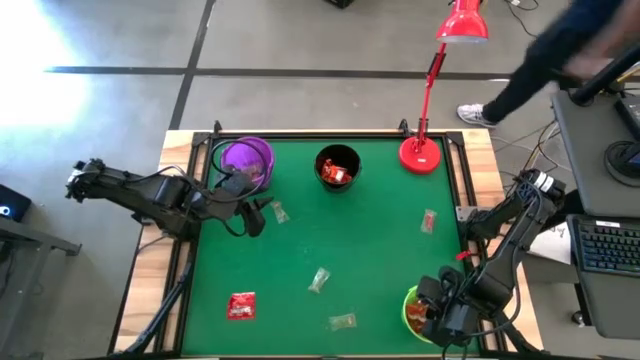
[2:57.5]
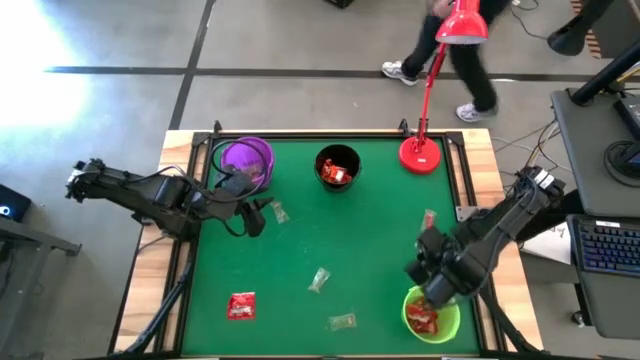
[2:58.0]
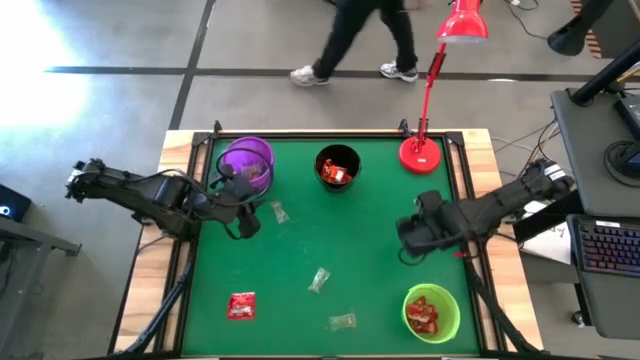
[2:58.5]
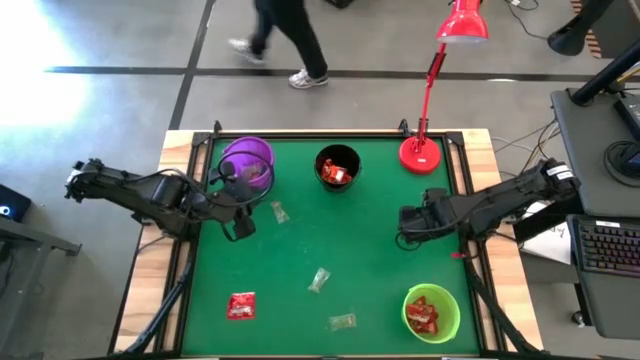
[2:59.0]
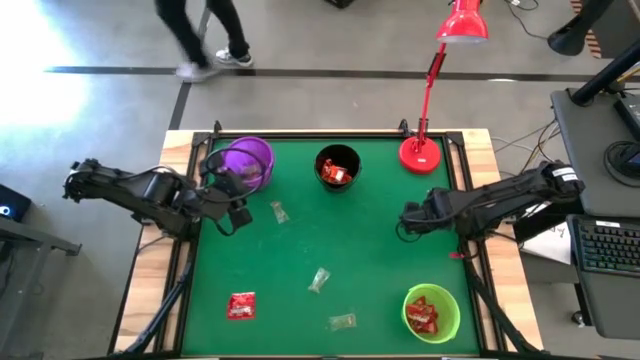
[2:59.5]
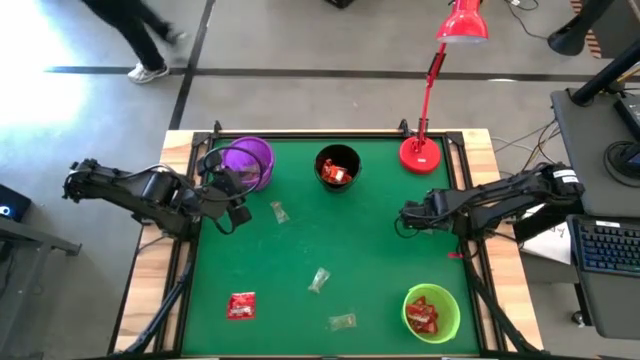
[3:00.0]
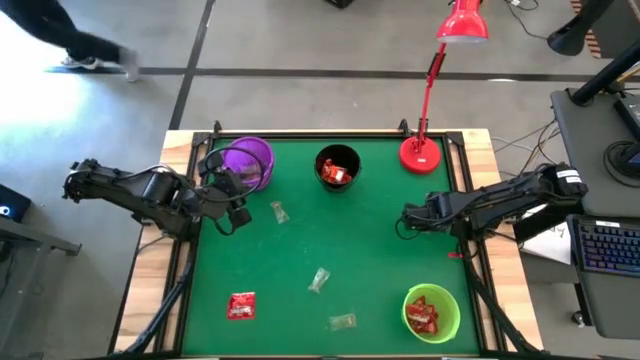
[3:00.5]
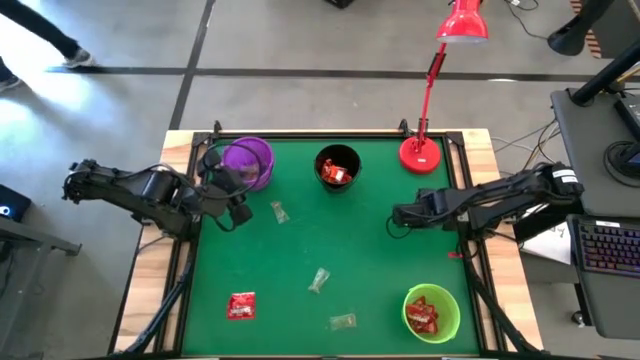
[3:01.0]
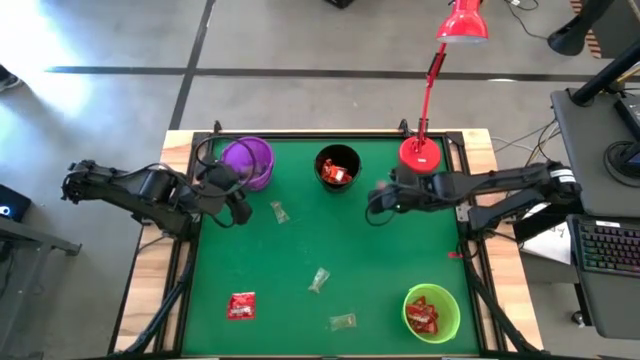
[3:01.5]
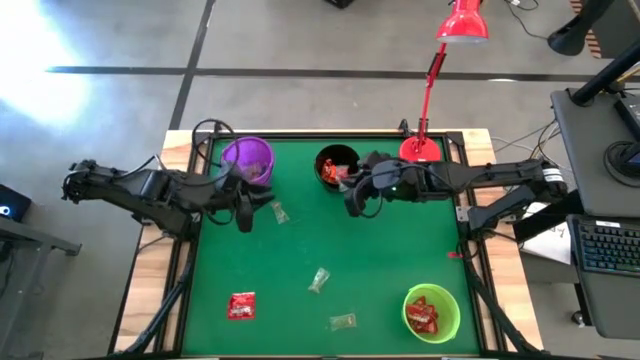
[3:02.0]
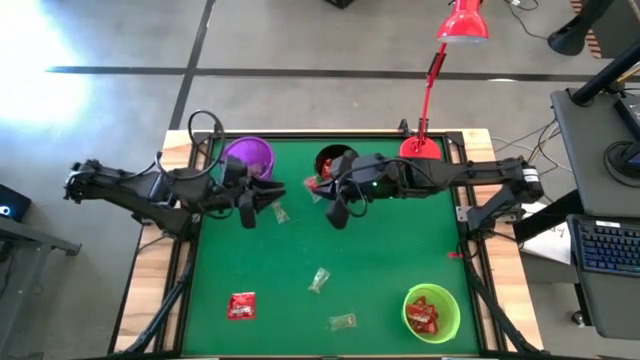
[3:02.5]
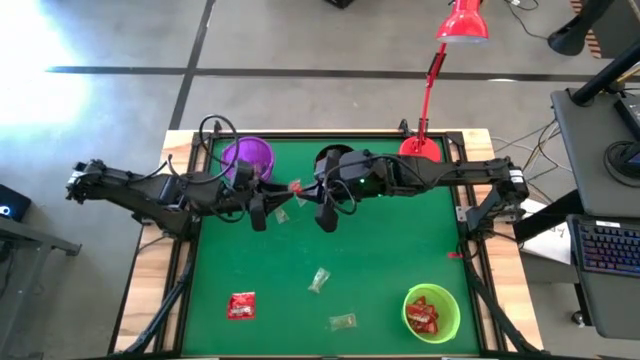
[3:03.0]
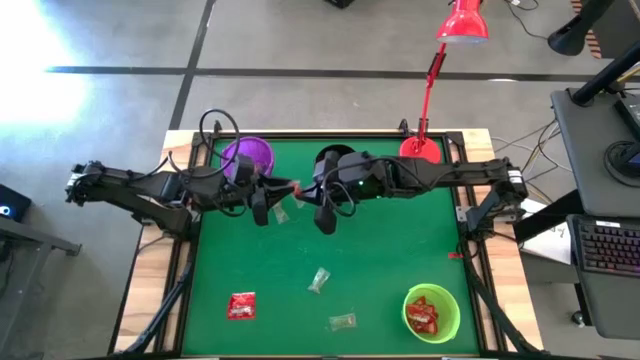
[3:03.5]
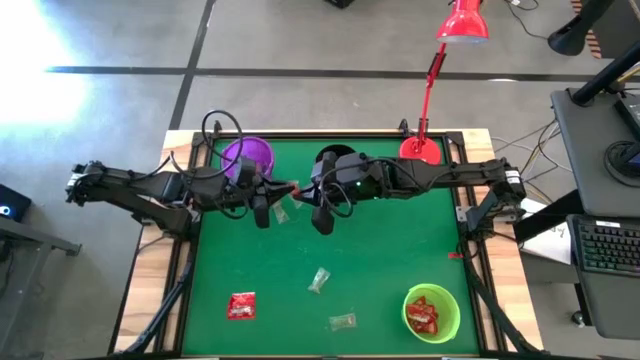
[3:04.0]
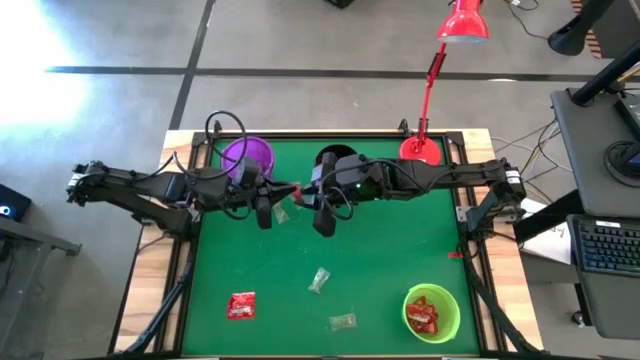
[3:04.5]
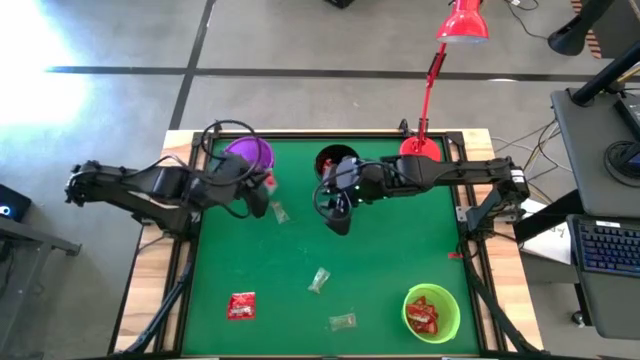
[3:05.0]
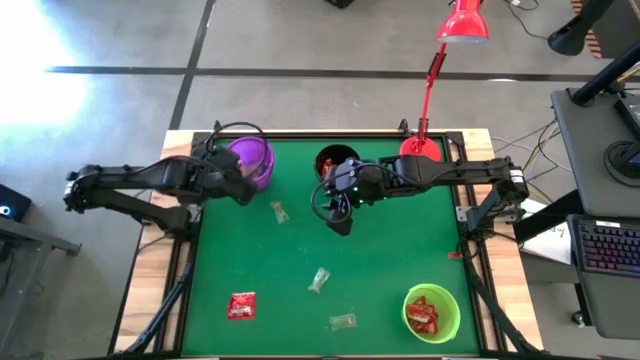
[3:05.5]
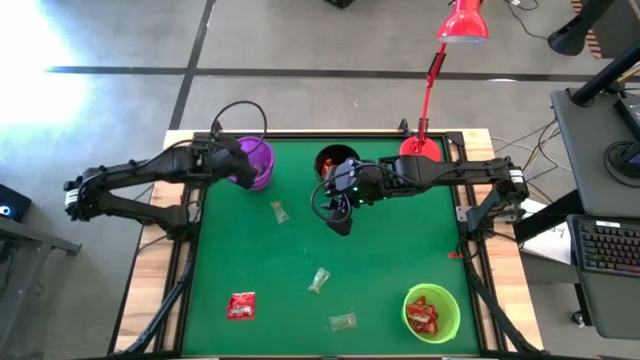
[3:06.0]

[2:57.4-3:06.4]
Task: Sort candy
Put the red gummy into the violet bucket

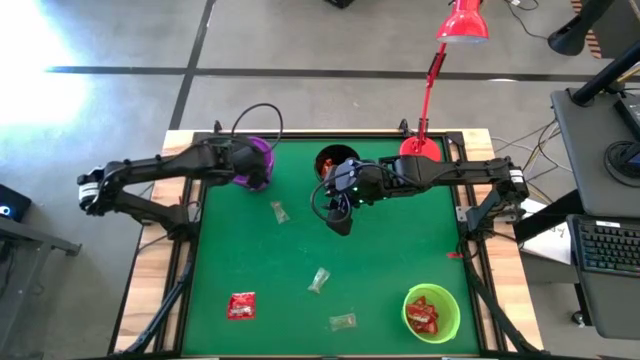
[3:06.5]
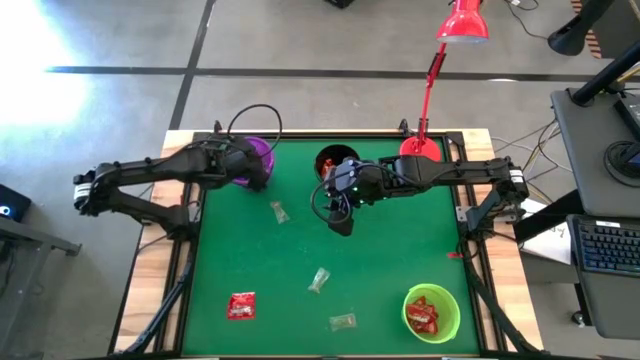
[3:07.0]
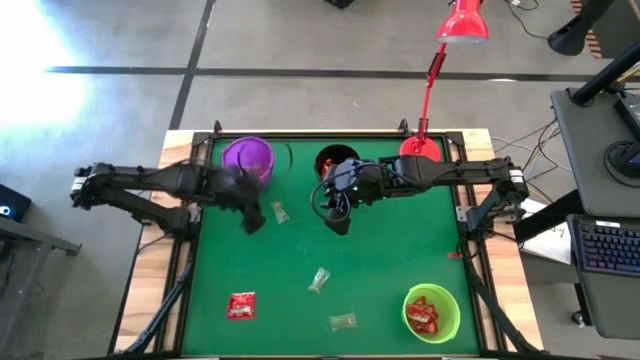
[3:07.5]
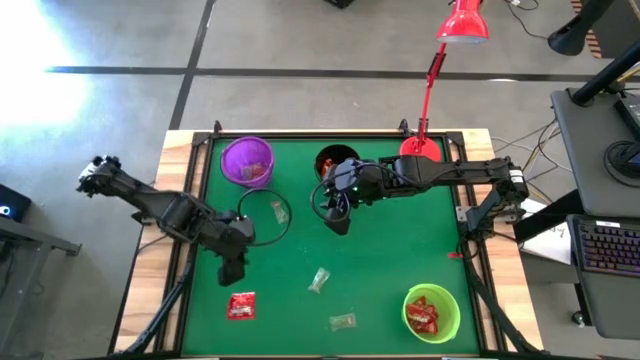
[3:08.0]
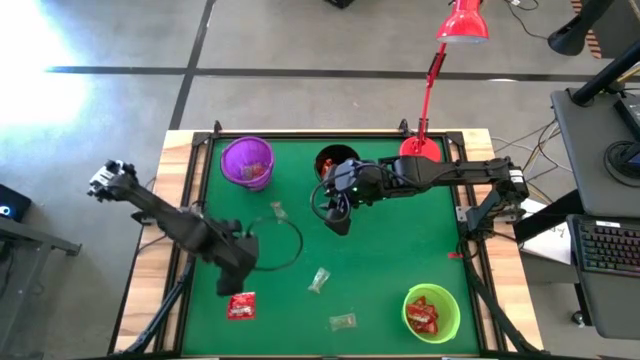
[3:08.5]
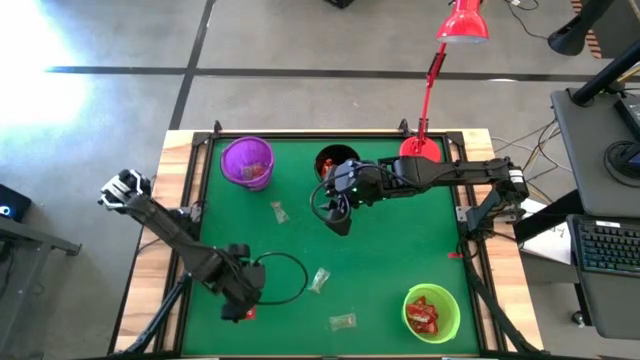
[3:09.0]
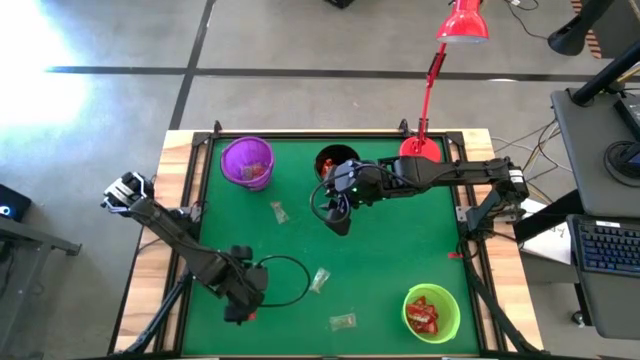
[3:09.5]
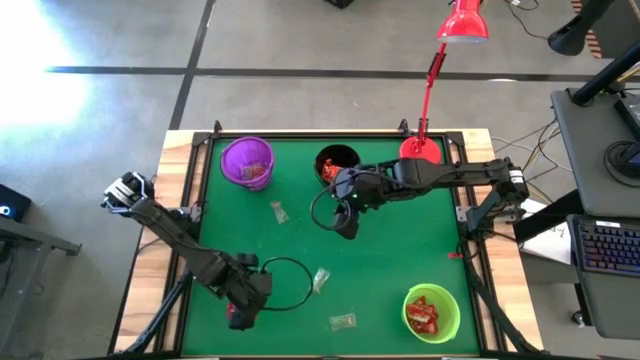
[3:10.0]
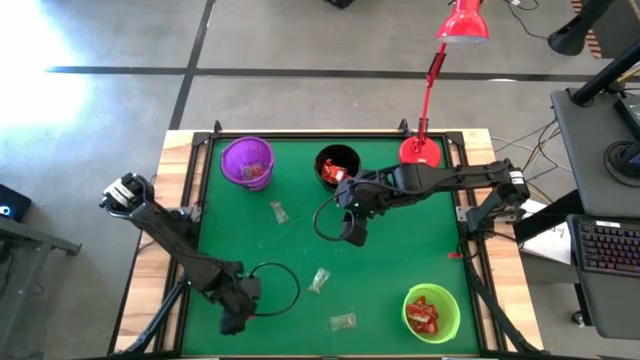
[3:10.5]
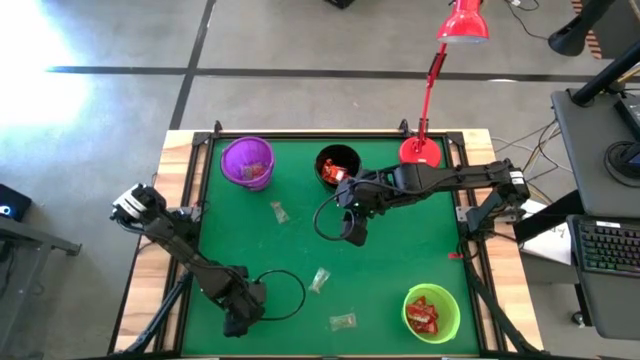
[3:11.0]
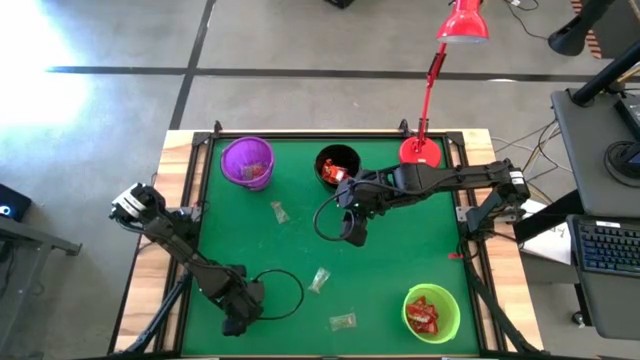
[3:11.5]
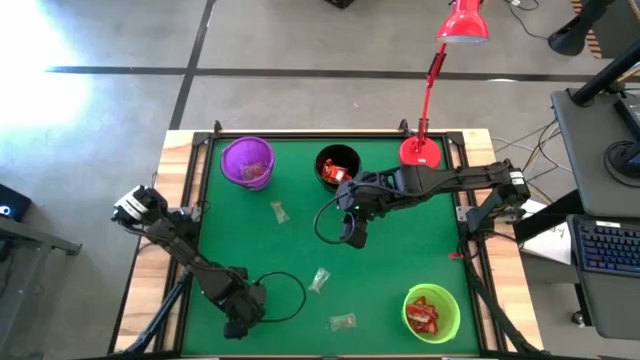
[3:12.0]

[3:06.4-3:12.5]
Put the red candy into the green bucket

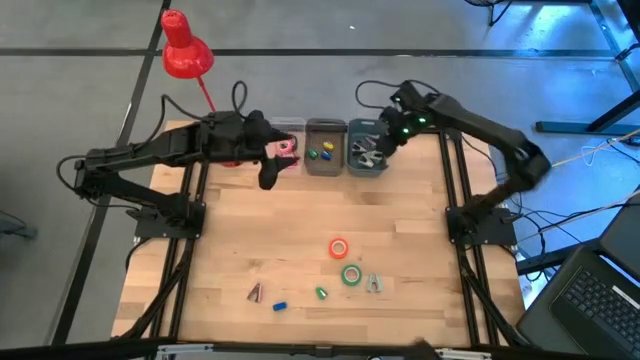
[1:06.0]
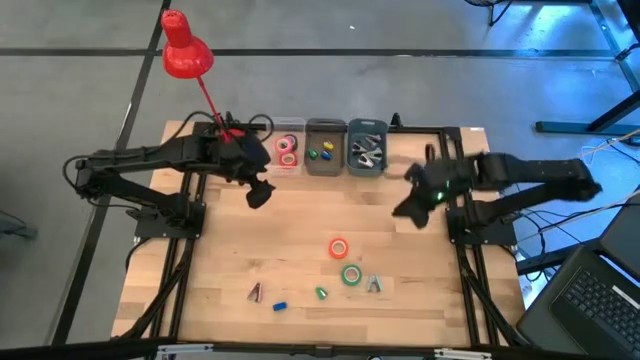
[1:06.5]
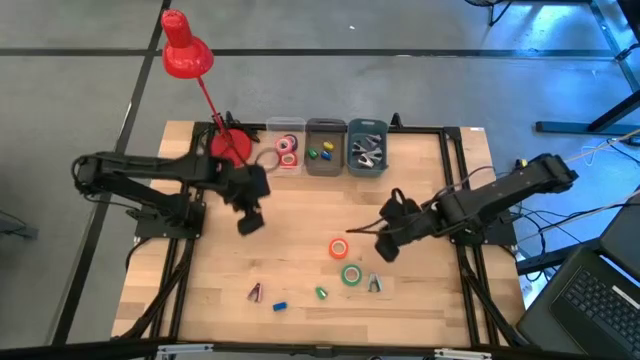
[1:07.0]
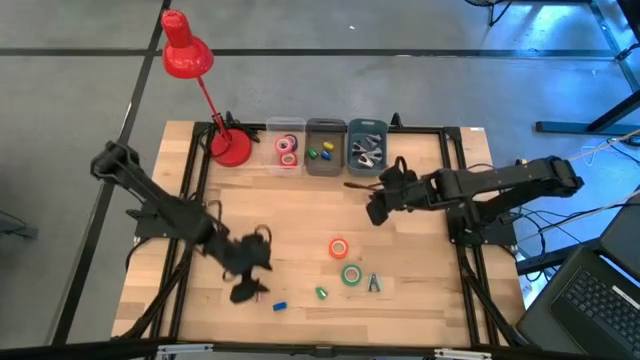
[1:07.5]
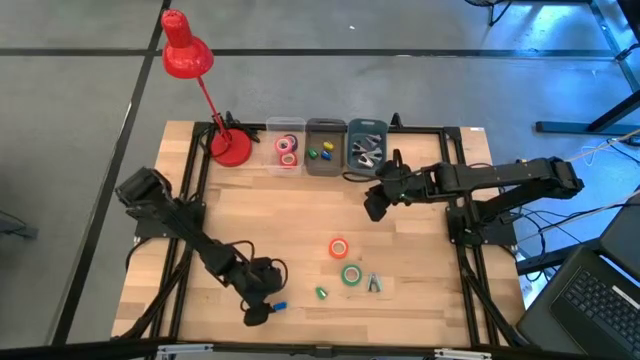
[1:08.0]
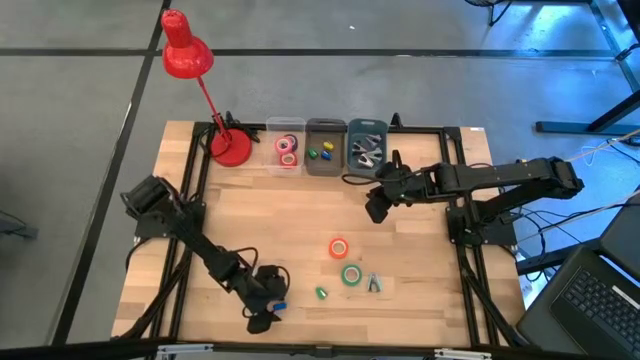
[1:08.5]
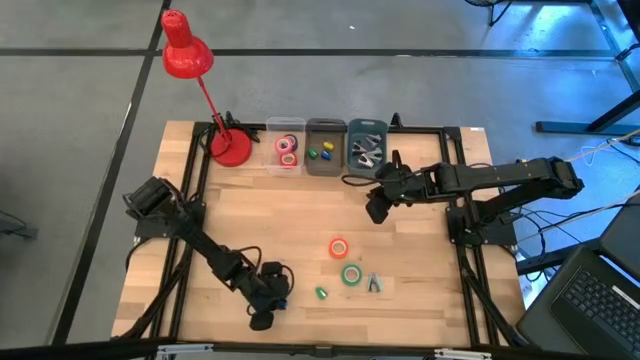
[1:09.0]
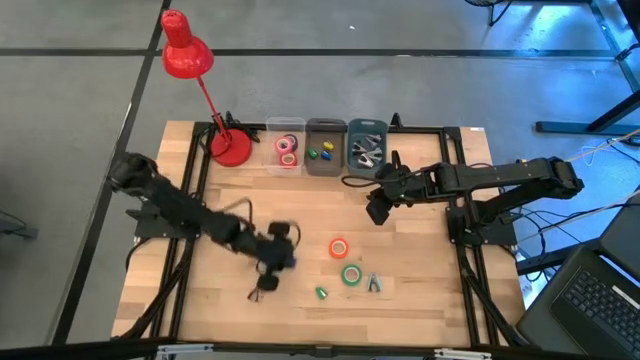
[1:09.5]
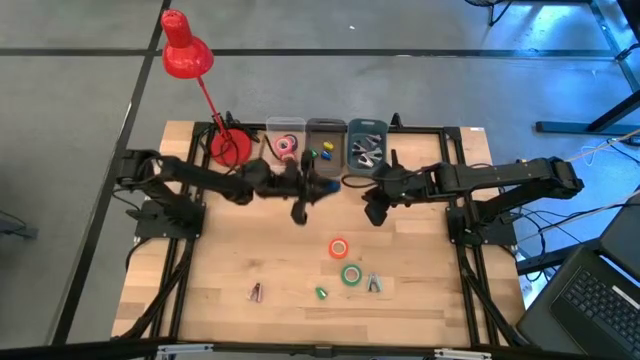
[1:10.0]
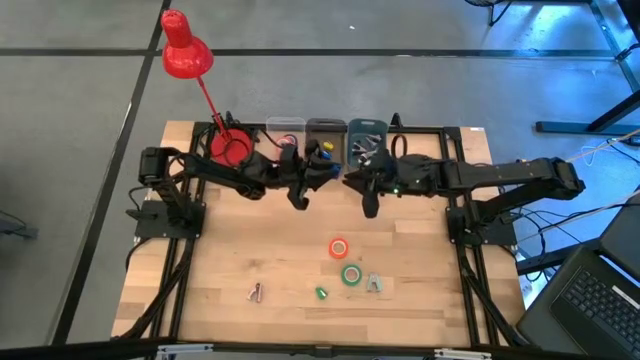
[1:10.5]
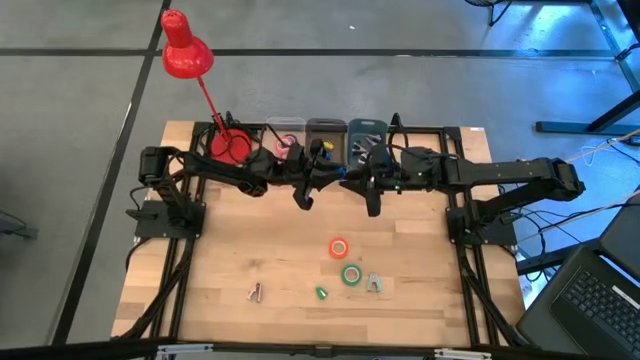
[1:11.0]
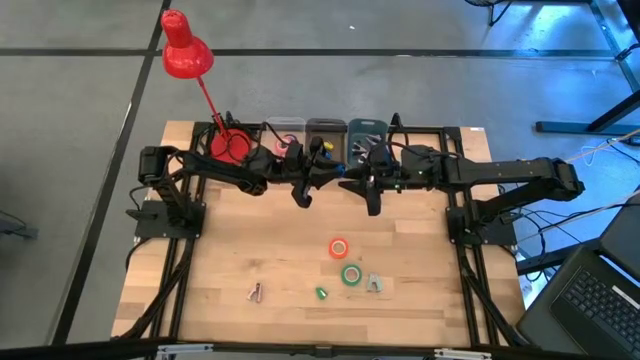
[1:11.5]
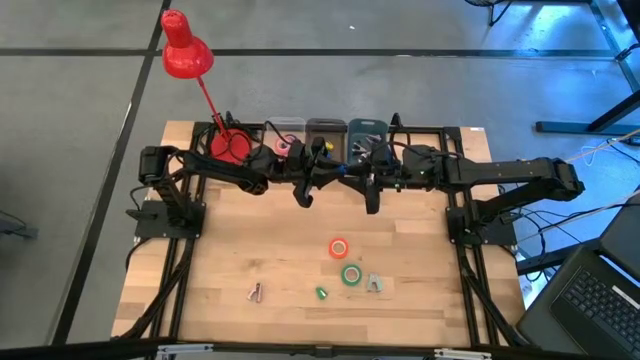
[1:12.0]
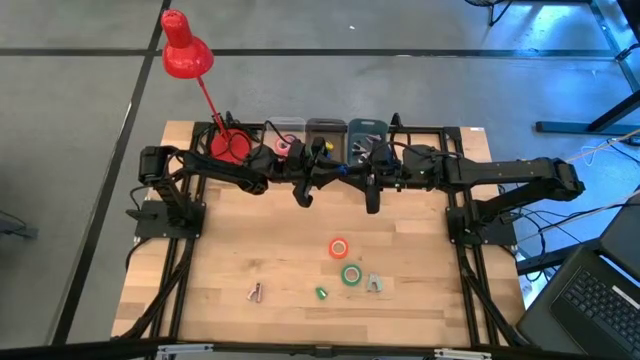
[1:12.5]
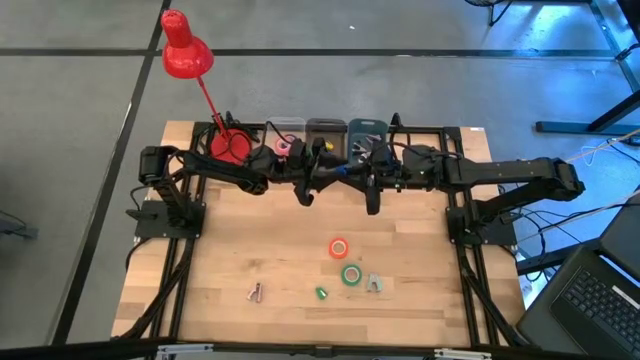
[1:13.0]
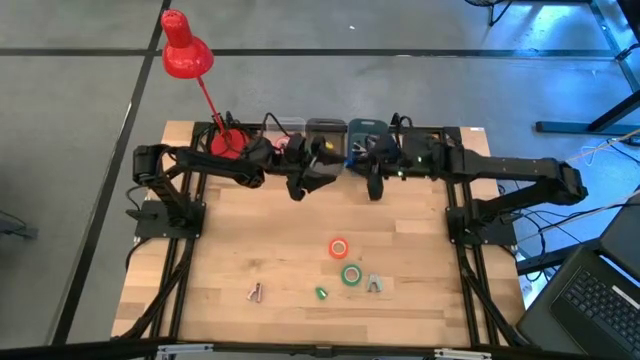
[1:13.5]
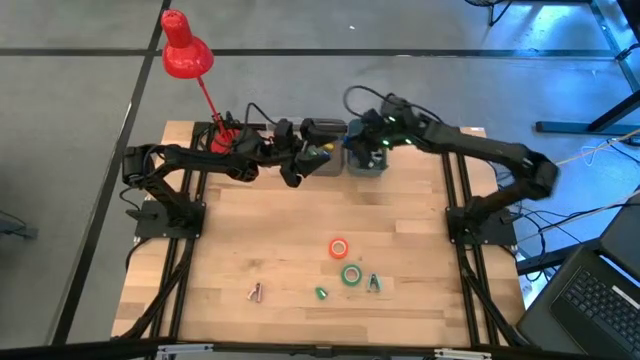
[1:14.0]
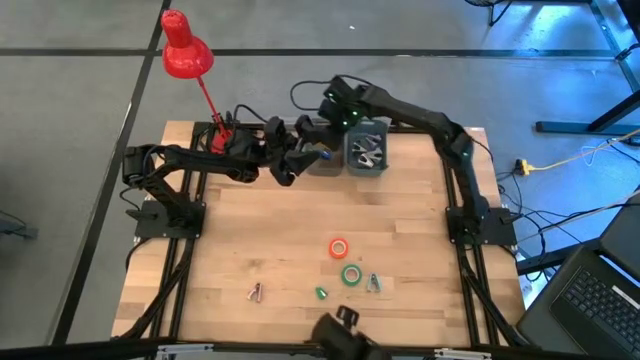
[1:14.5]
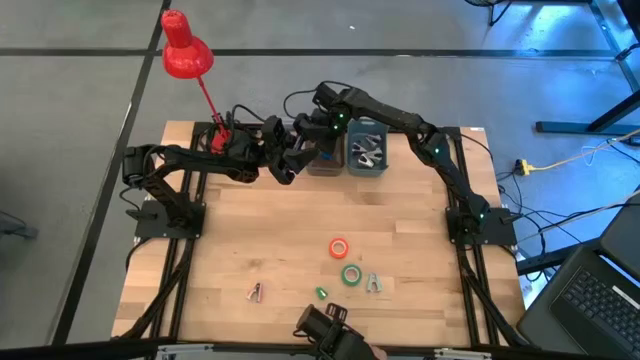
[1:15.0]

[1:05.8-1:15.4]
Task: Pick and place Stapler, Stapler remover, tape
Put the blue stapler into the black bin
